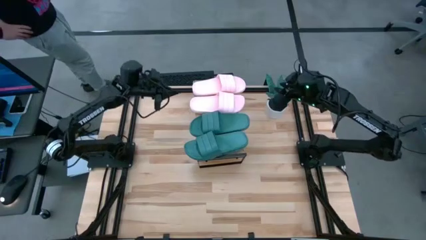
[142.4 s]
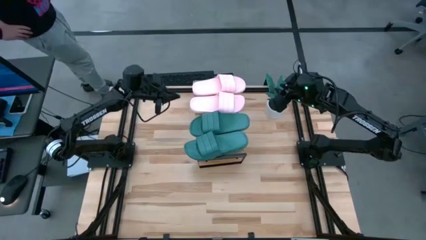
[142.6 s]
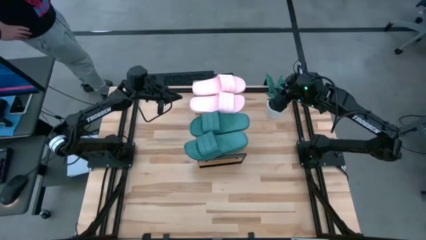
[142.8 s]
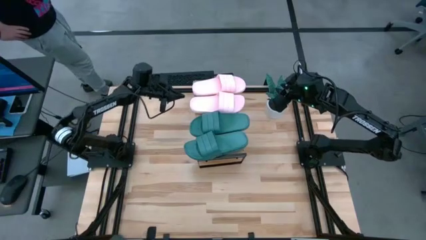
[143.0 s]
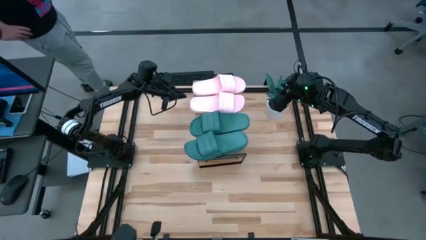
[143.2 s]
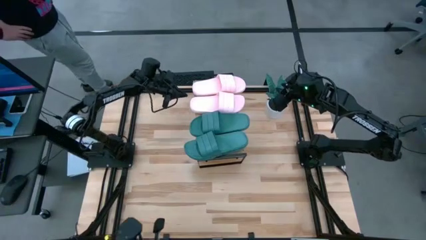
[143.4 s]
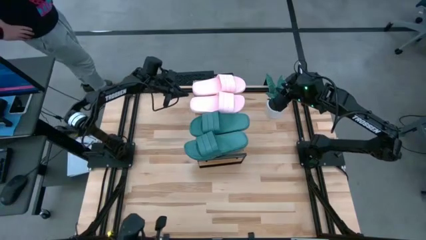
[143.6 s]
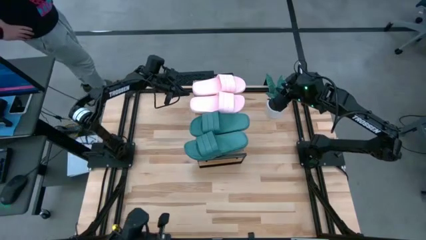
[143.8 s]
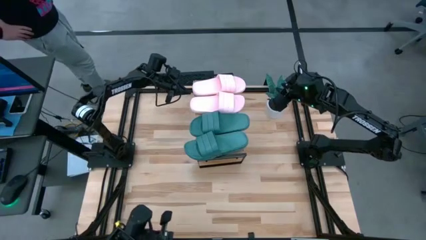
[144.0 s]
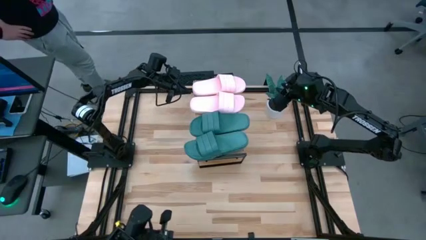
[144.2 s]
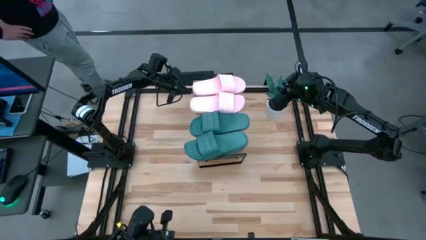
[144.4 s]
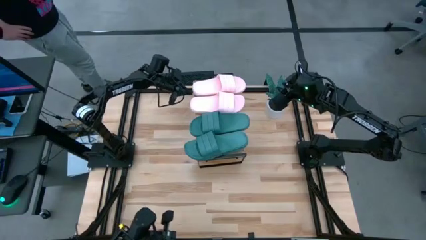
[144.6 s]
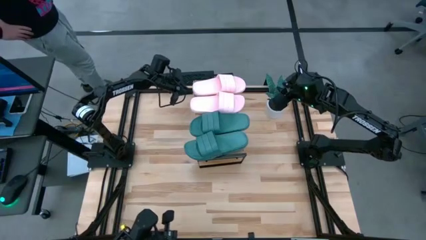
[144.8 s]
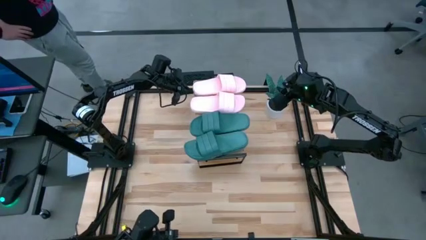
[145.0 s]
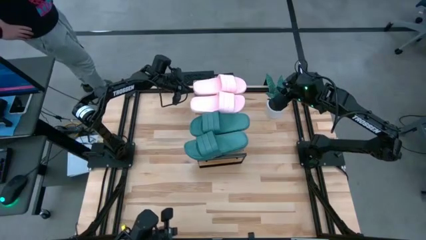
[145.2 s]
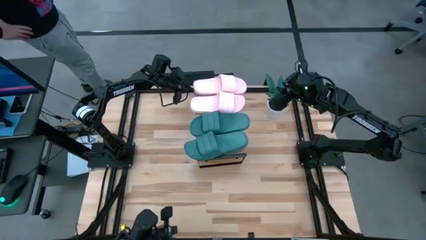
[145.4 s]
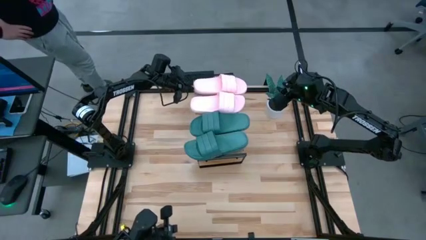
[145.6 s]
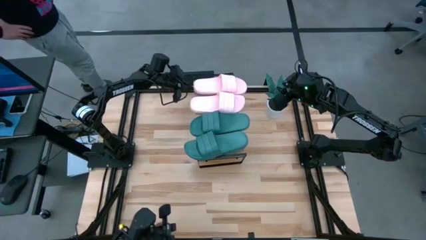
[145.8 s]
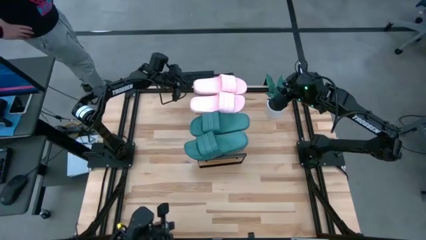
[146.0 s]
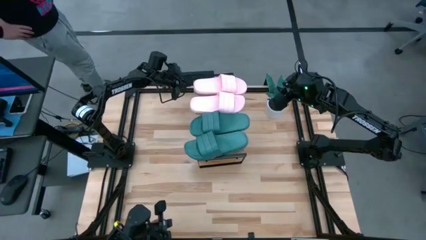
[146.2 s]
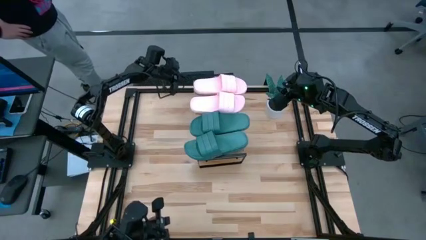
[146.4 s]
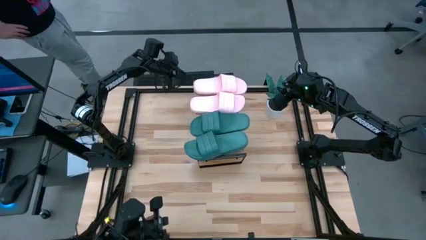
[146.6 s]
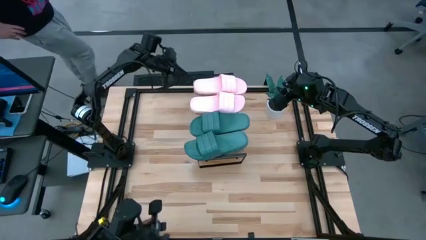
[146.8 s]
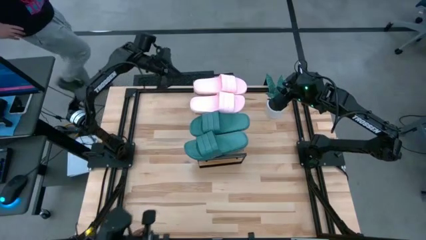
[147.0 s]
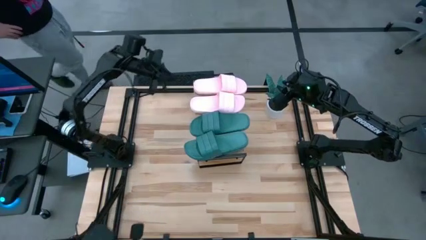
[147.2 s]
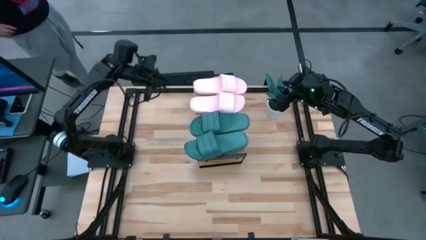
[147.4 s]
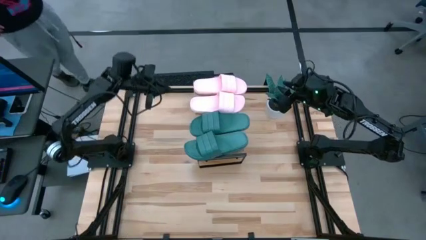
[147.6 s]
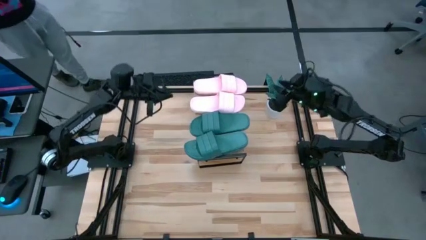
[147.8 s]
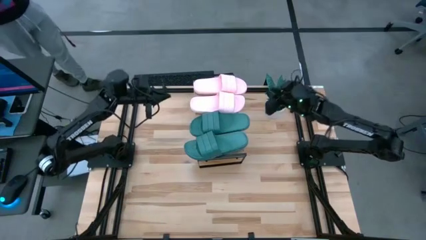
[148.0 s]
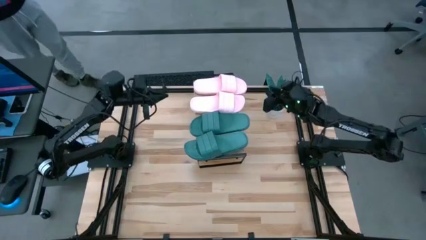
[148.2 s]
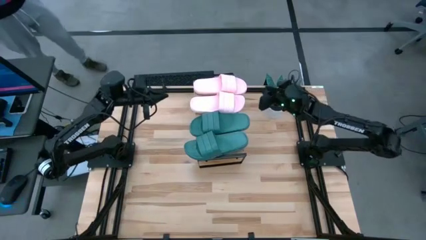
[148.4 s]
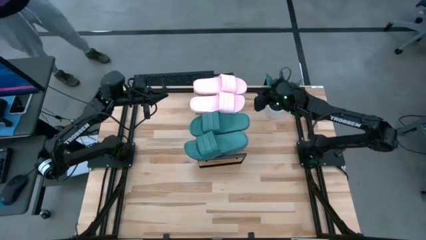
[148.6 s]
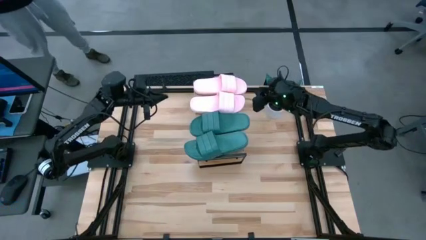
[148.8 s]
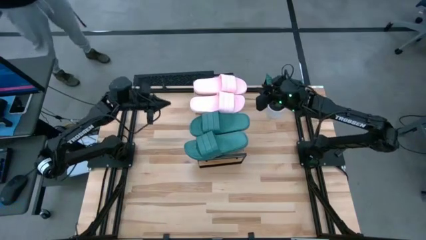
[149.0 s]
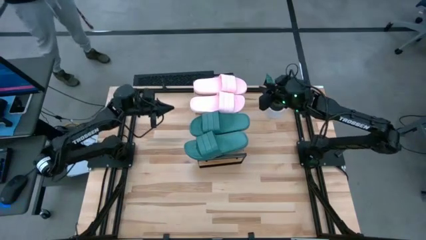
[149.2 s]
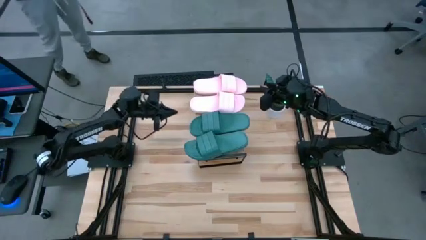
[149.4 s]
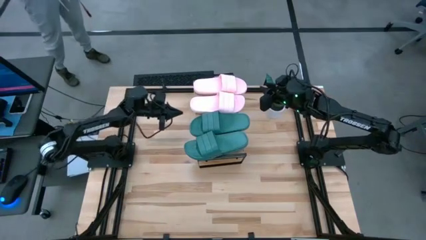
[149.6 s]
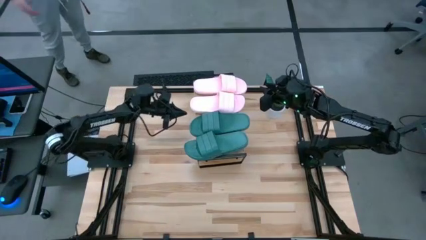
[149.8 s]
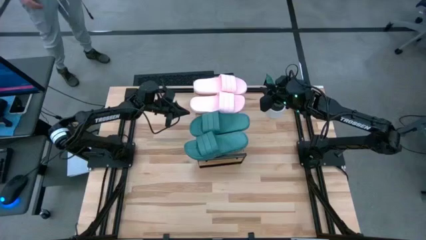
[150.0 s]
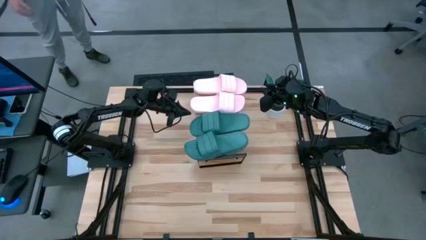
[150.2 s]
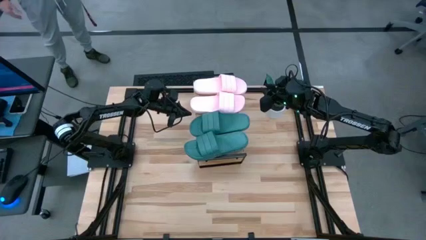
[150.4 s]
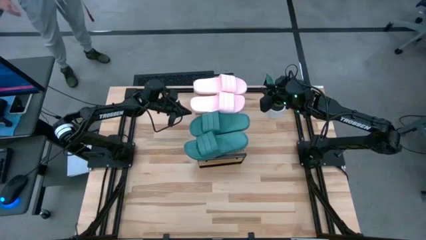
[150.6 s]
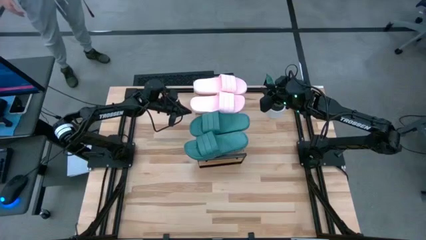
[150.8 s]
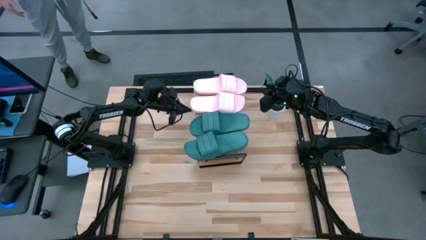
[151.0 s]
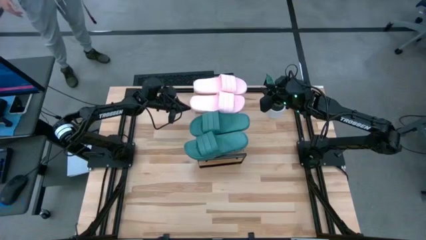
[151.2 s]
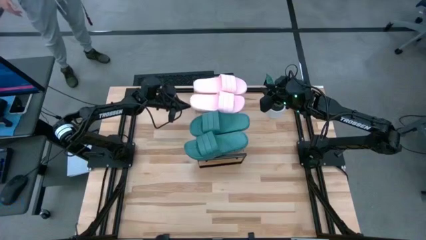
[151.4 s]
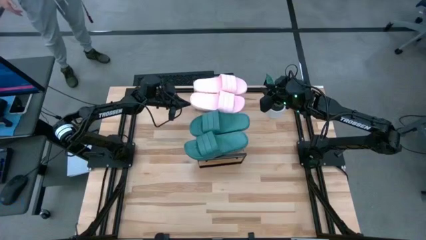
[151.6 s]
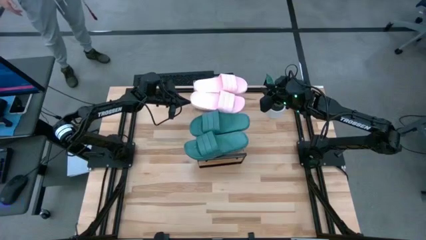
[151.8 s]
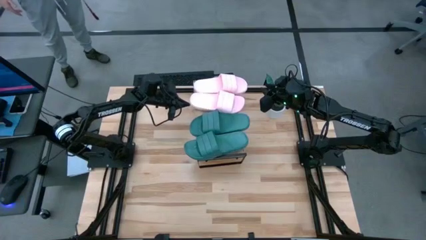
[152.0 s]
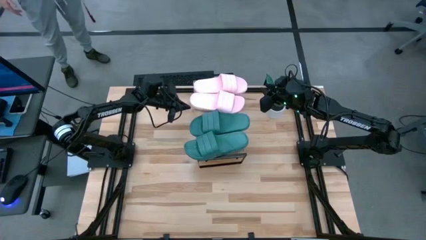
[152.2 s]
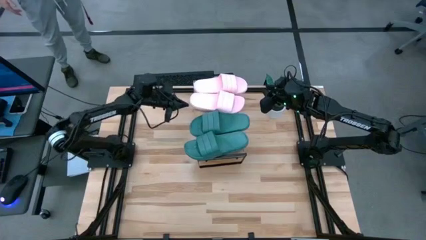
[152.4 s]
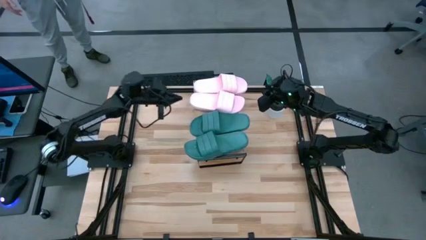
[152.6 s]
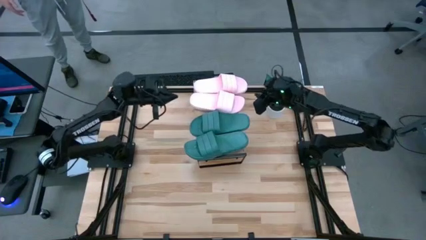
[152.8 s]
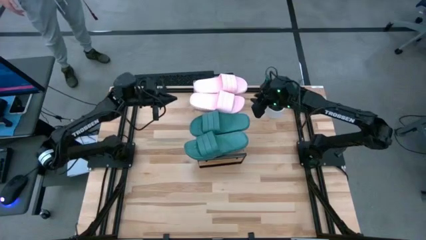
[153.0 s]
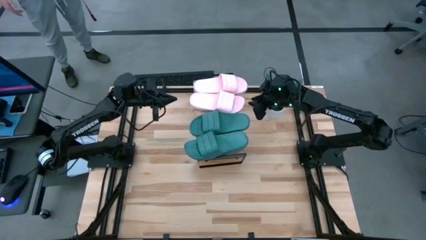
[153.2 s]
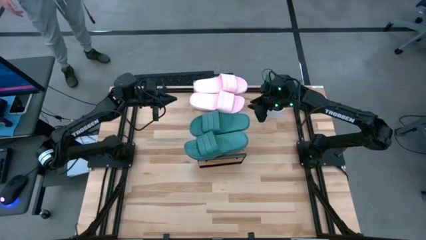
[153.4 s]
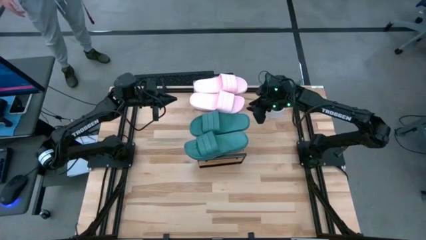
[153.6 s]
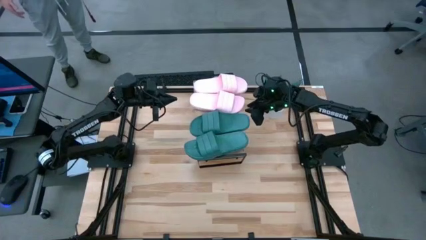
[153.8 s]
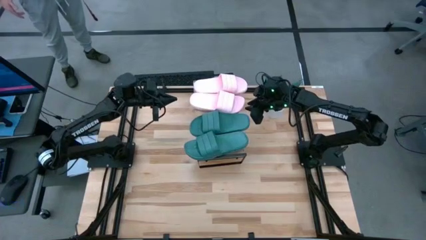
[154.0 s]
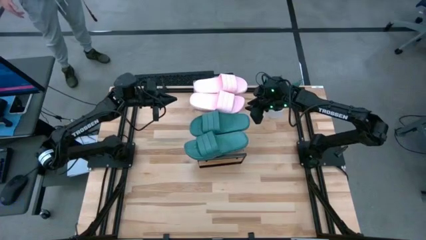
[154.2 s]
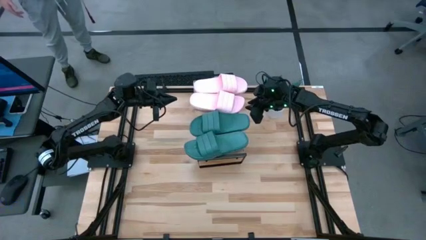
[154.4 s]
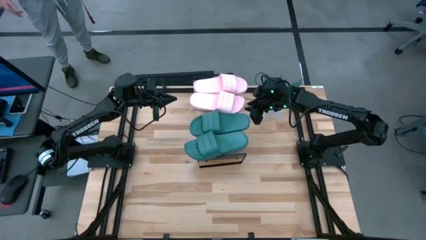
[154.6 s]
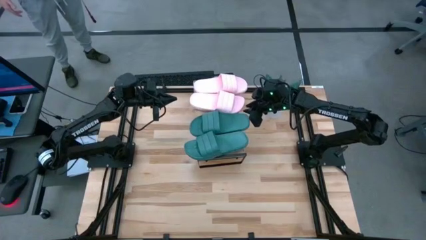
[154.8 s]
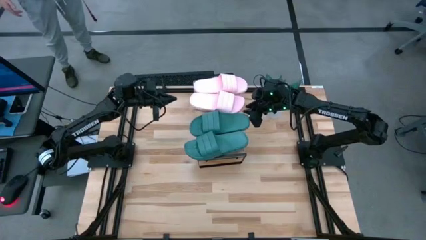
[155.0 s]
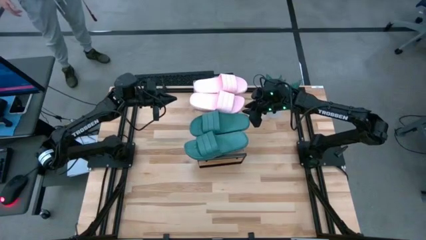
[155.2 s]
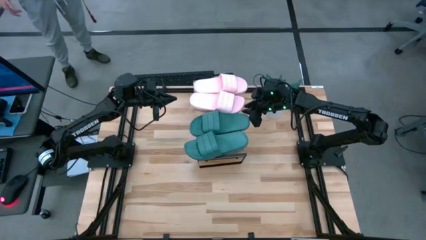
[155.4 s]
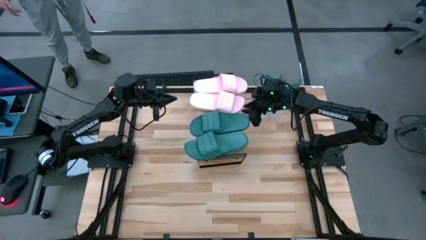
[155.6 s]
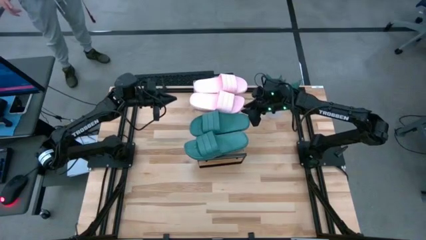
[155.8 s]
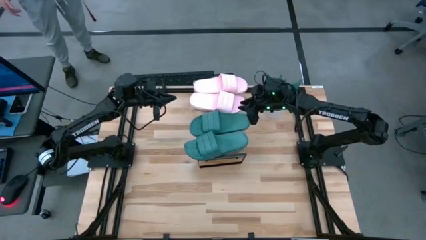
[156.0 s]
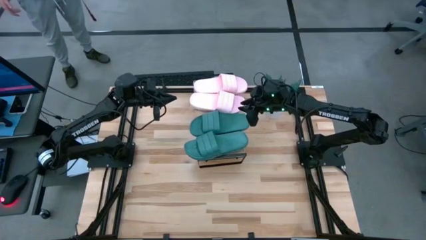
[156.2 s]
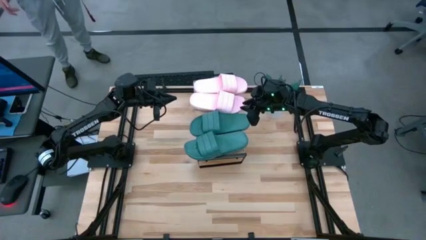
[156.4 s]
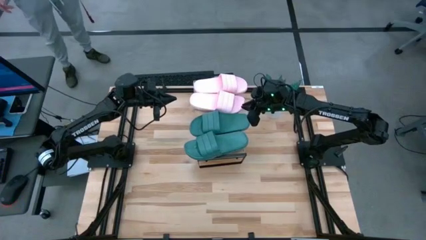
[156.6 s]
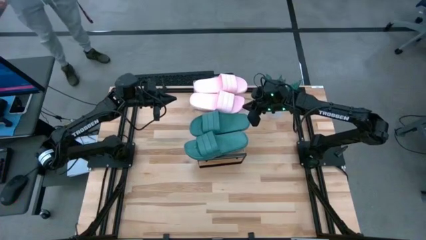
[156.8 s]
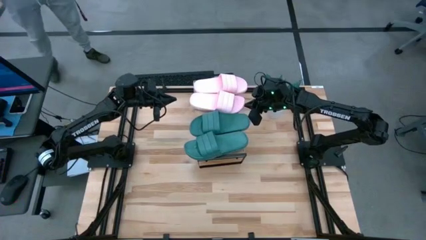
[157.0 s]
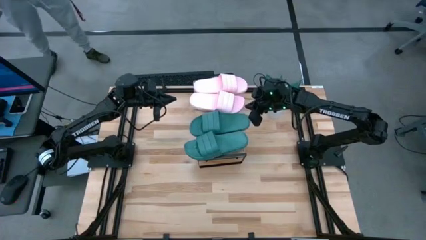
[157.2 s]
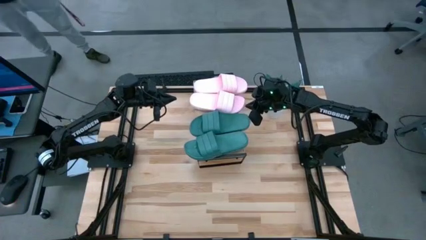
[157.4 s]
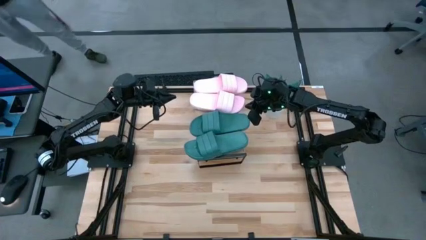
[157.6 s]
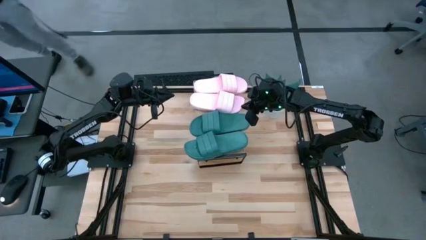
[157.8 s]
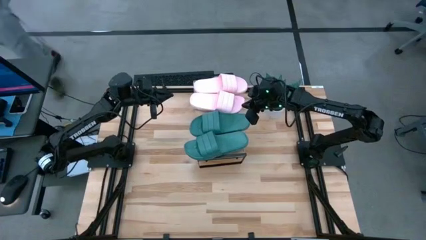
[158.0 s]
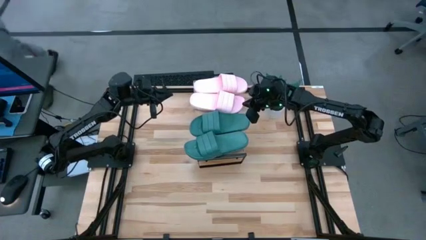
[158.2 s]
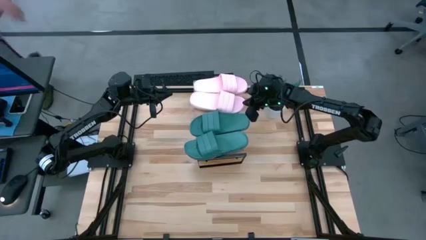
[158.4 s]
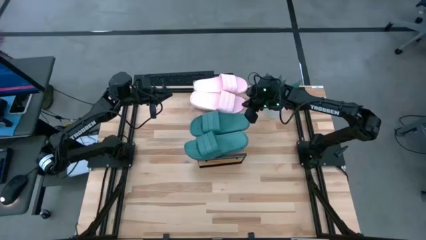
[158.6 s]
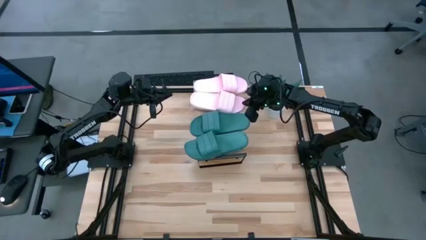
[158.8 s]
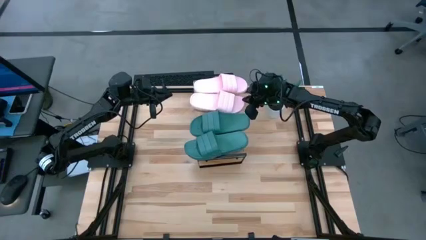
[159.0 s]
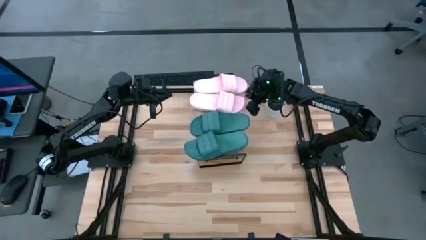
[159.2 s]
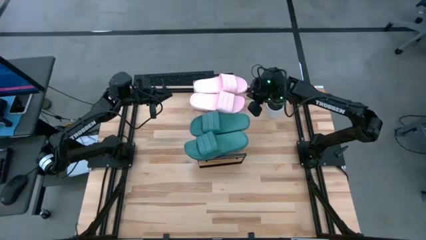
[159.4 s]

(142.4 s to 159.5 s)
Task: Pick and place slides into the shelf
Adjust the slides on the shelf
